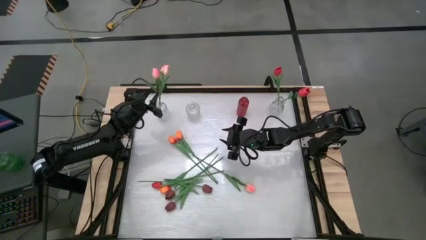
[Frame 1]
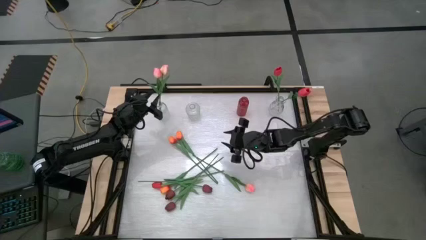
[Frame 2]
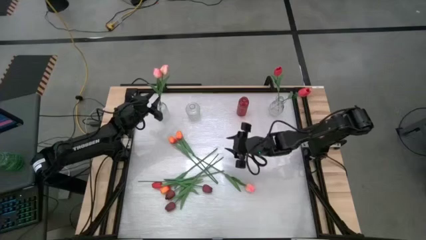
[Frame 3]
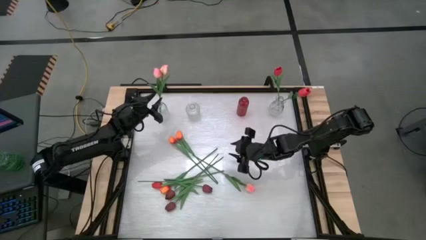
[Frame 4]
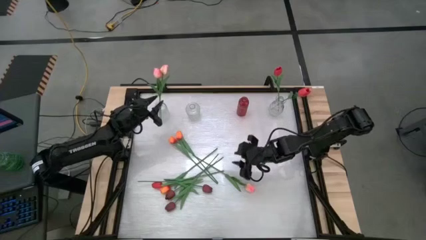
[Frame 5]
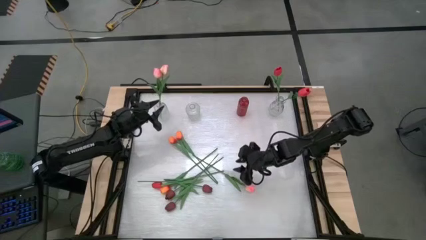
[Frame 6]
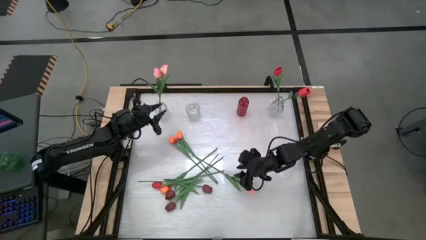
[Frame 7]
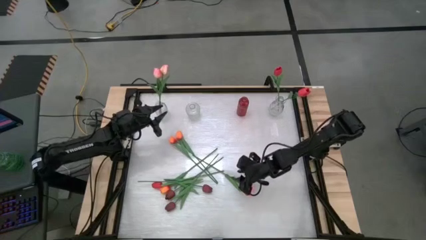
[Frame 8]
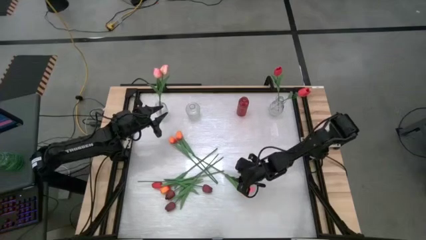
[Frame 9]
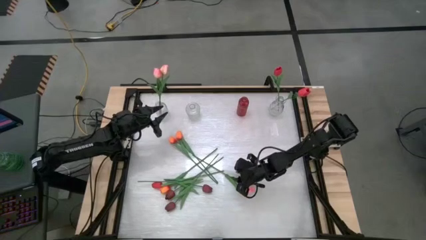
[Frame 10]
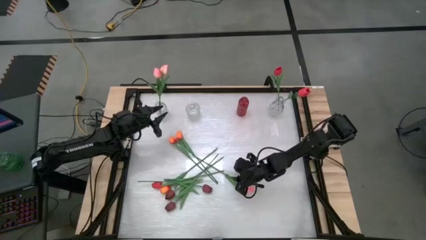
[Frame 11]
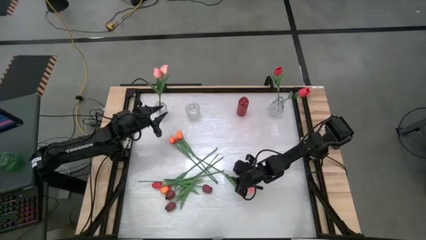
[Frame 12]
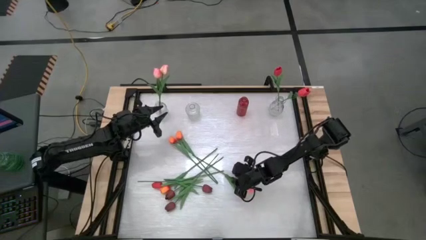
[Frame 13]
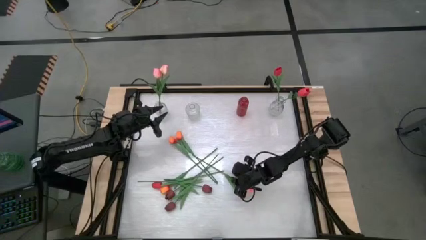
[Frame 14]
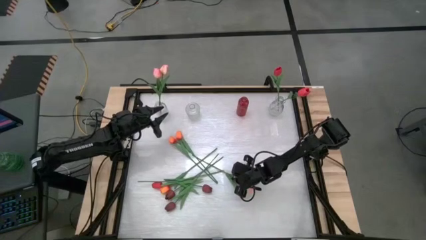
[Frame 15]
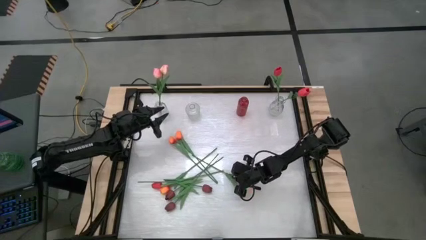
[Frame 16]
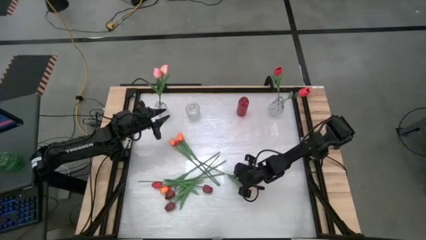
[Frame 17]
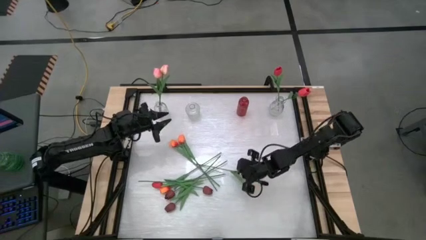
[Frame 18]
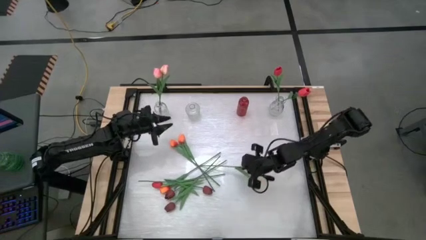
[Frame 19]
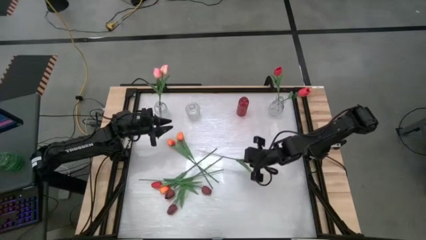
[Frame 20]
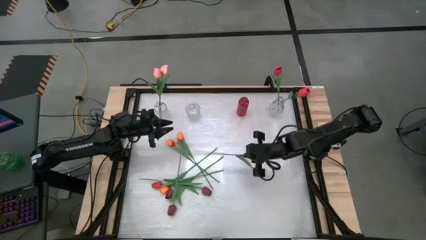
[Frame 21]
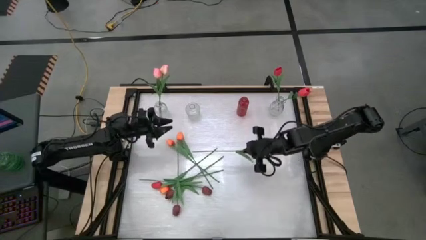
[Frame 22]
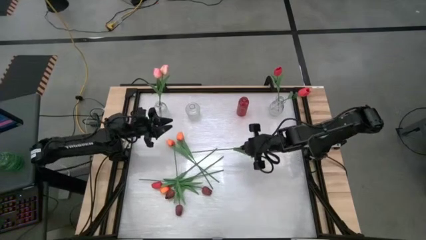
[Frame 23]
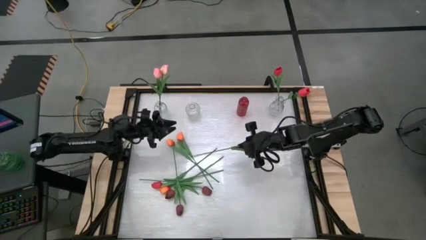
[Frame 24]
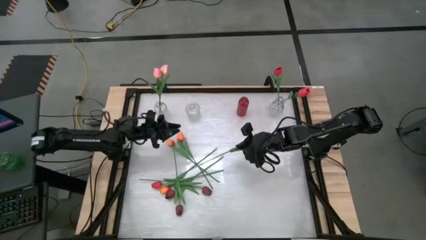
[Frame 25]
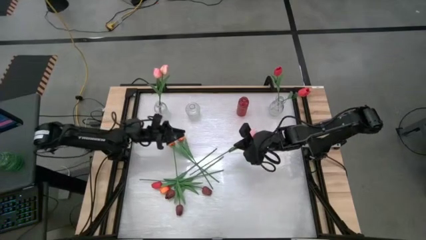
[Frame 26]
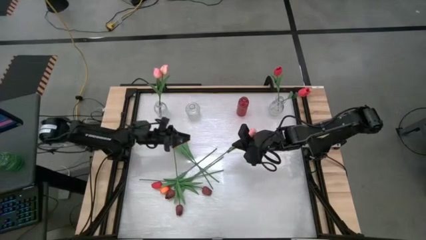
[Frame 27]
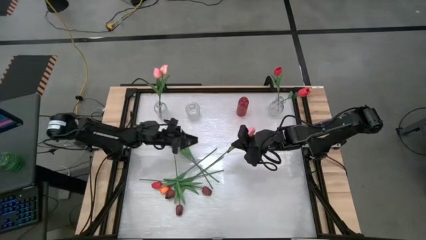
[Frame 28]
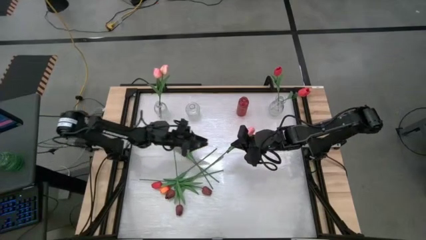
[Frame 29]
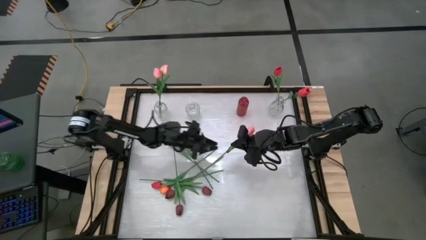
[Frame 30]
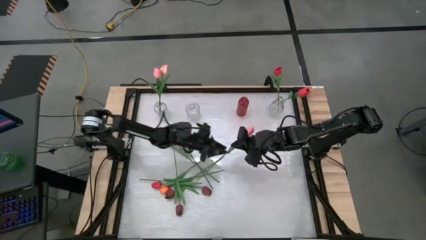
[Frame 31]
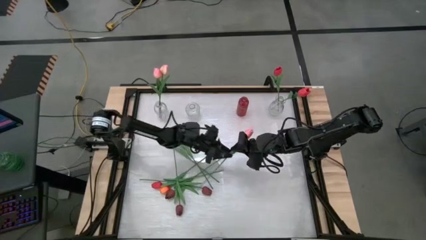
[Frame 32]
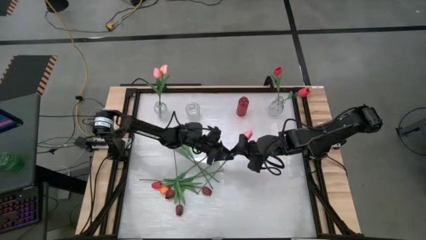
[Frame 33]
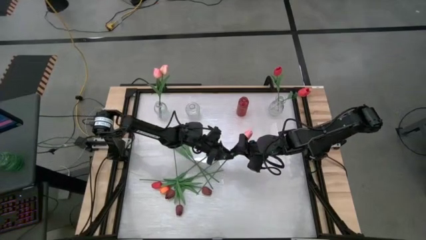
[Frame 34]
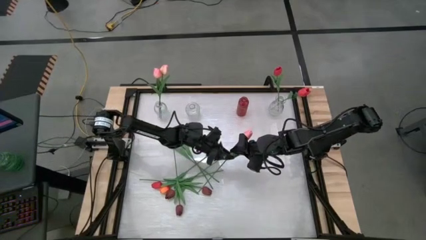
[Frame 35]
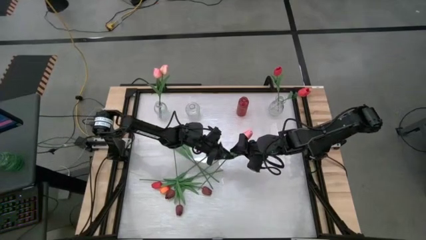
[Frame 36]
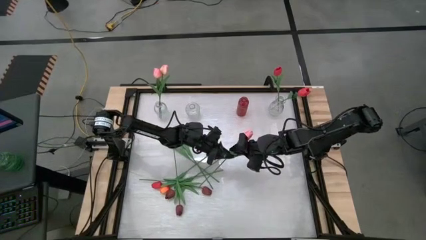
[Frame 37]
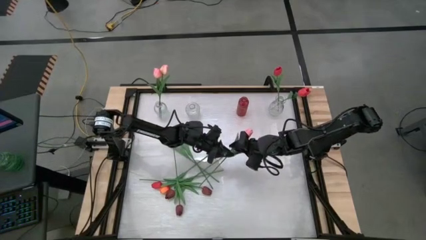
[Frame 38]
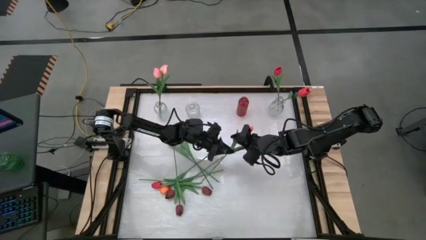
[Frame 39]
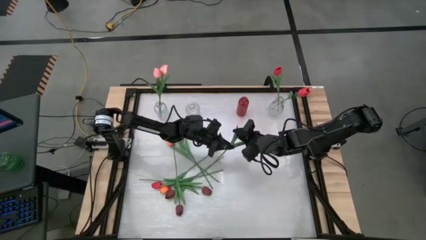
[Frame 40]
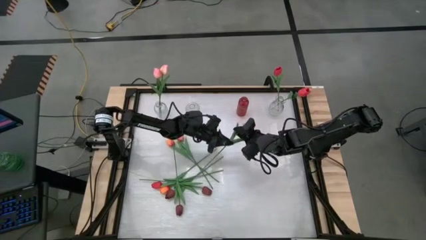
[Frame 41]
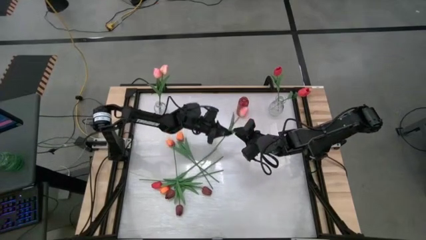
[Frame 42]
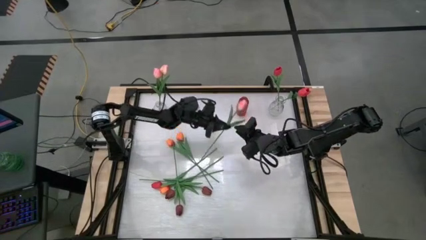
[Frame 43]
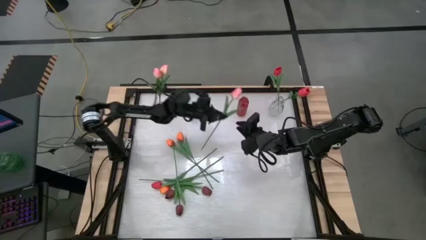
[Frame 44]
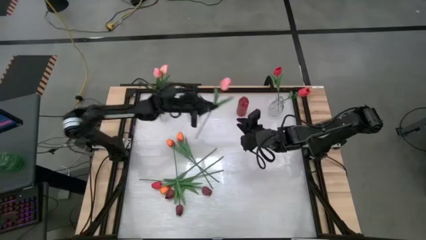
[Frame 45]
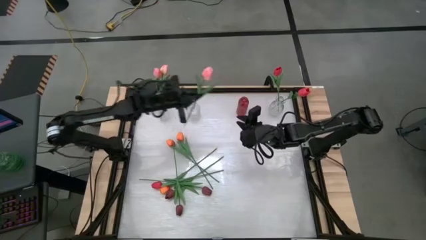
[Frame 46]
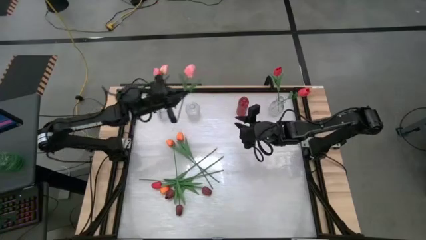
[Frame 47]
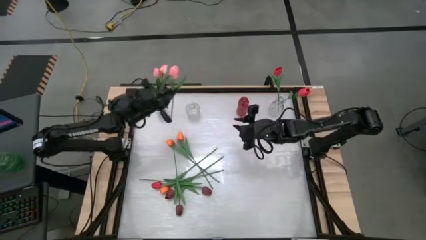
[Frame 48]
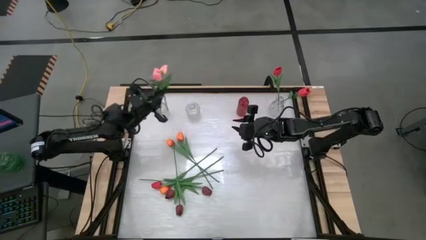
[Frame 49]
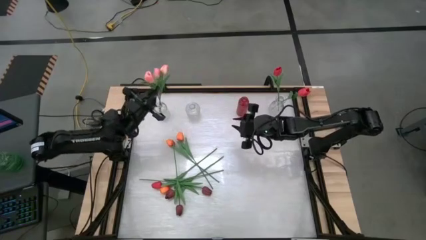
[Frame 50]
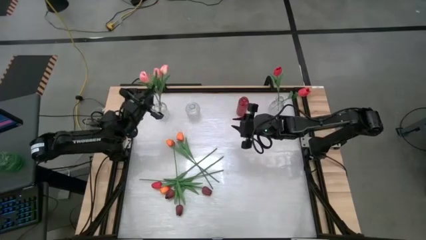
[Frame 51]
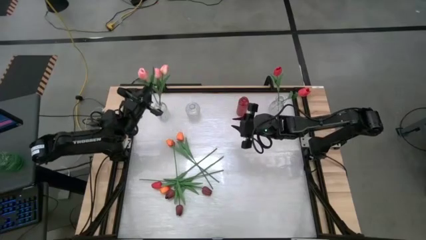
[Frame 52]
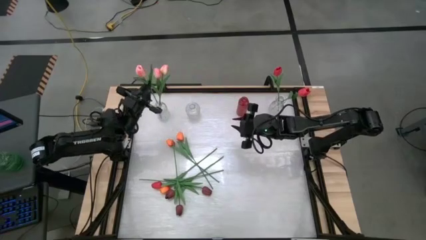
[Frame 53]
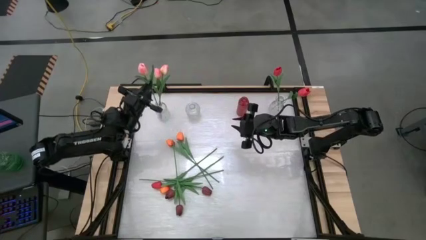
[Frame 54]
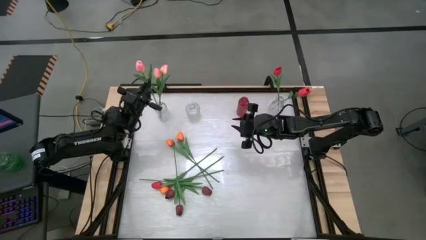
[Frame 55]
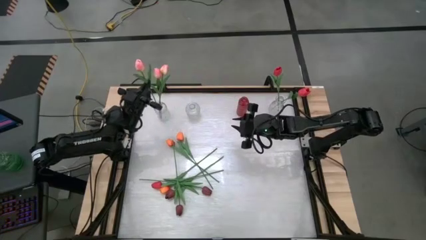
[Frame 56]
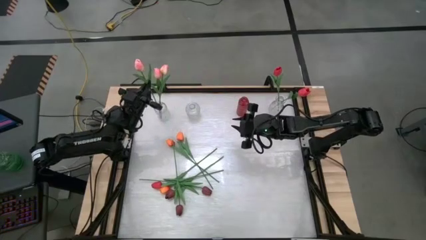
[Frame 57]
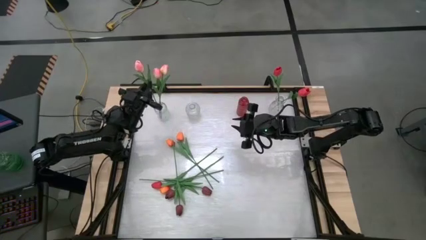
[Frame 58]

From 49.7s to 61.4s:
Task: Sort flowers into vase by color
Put the white-pink flower into the left transparent vase

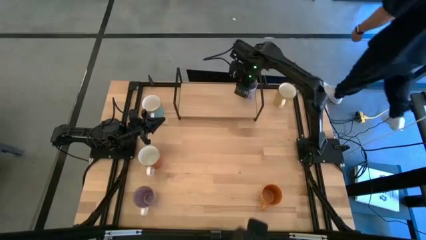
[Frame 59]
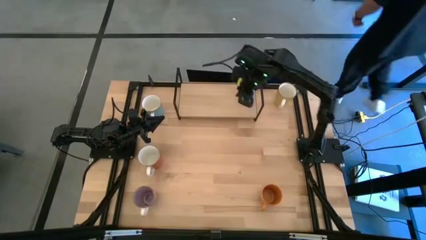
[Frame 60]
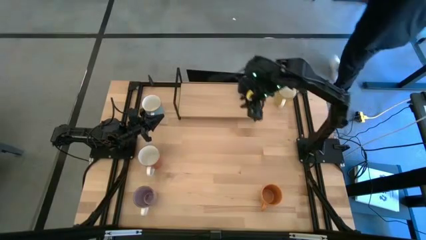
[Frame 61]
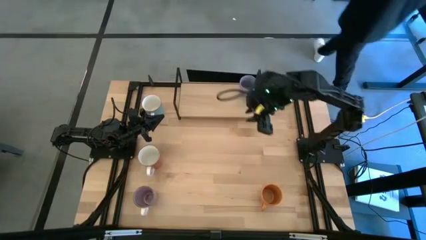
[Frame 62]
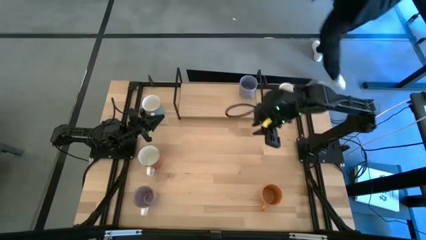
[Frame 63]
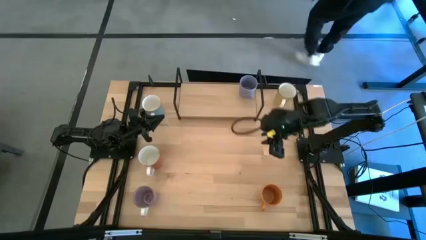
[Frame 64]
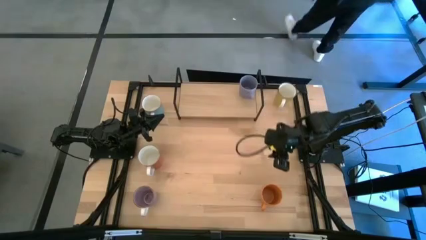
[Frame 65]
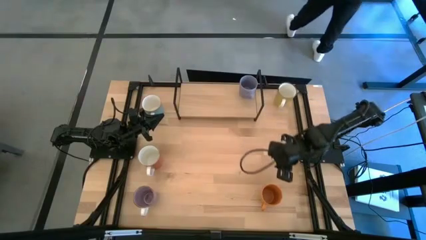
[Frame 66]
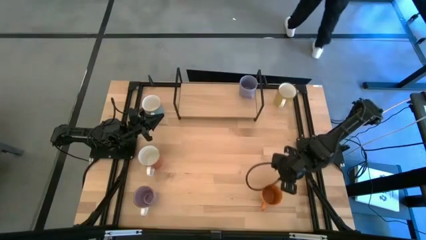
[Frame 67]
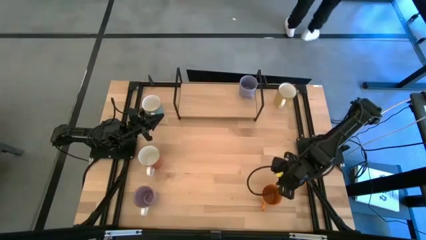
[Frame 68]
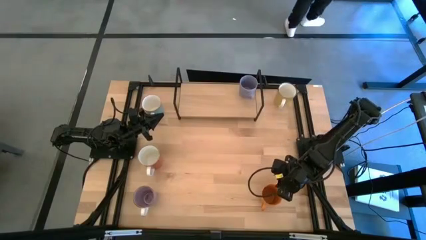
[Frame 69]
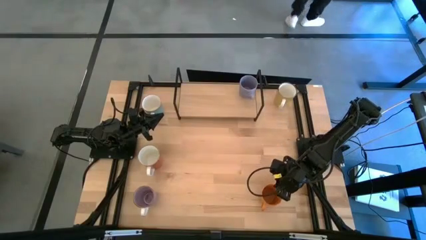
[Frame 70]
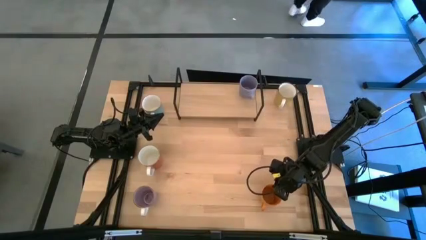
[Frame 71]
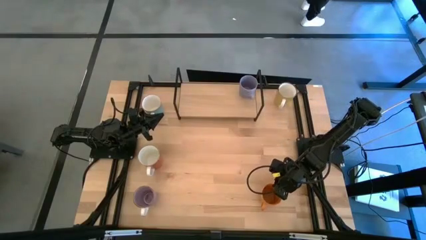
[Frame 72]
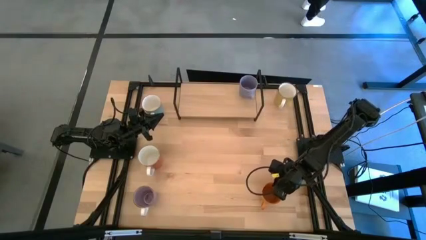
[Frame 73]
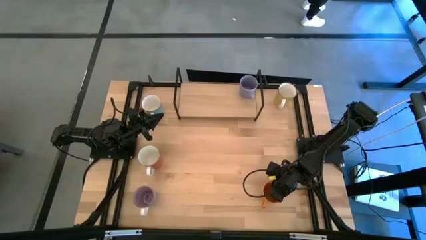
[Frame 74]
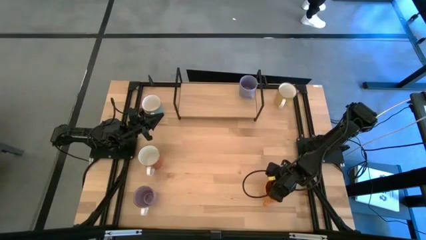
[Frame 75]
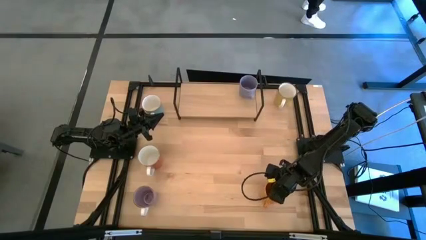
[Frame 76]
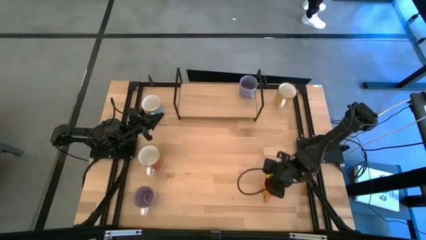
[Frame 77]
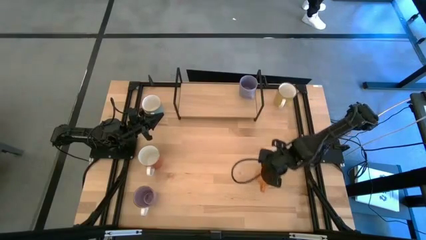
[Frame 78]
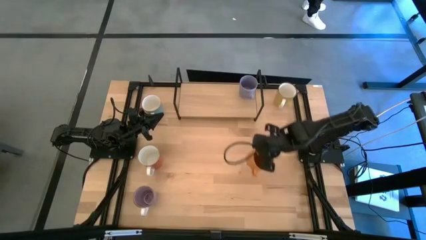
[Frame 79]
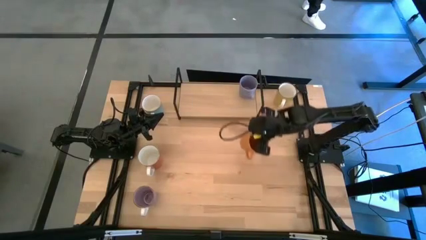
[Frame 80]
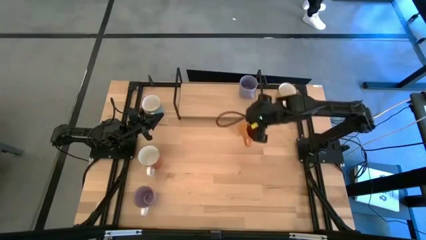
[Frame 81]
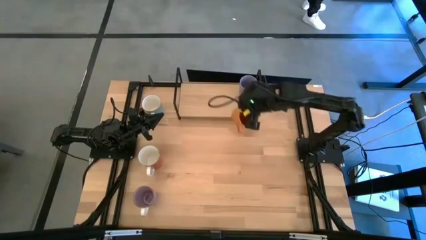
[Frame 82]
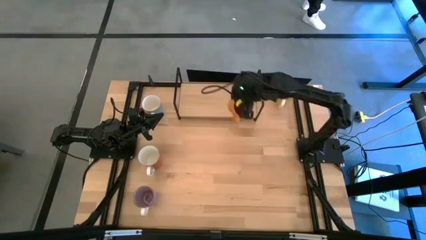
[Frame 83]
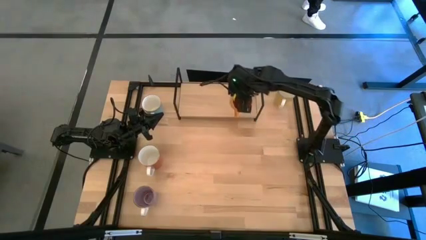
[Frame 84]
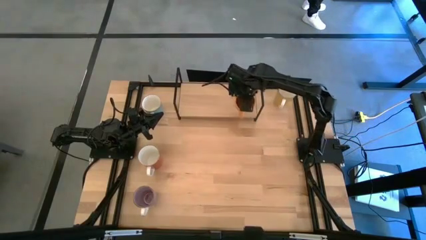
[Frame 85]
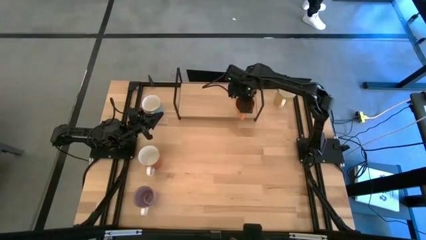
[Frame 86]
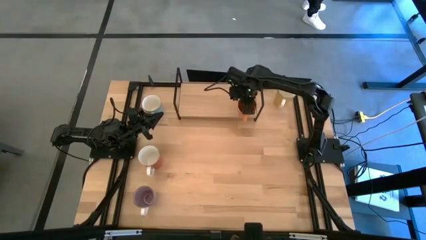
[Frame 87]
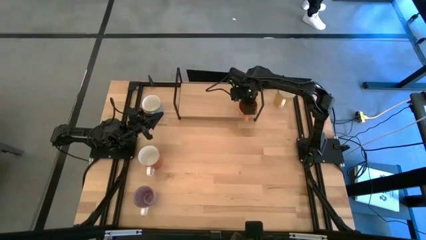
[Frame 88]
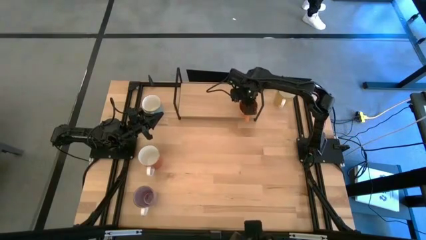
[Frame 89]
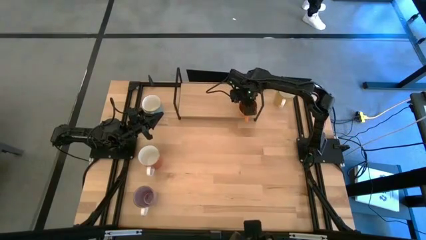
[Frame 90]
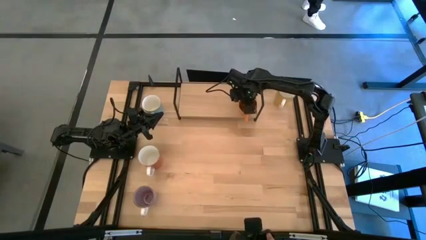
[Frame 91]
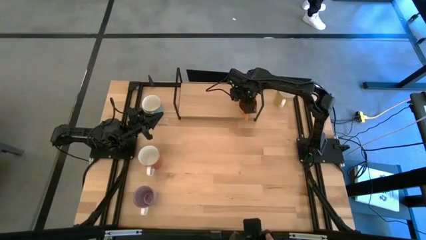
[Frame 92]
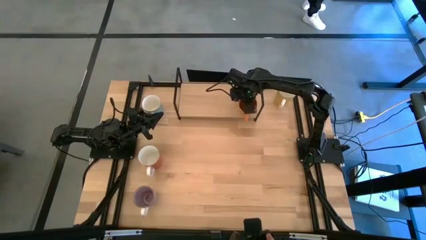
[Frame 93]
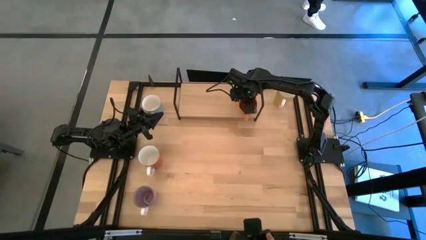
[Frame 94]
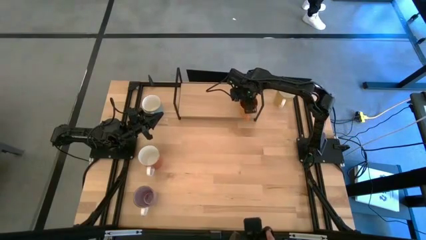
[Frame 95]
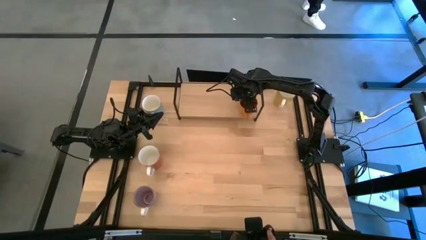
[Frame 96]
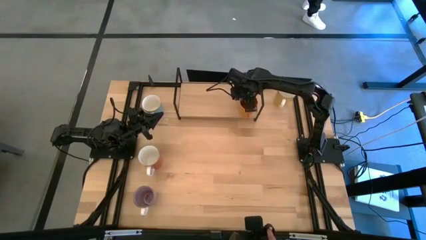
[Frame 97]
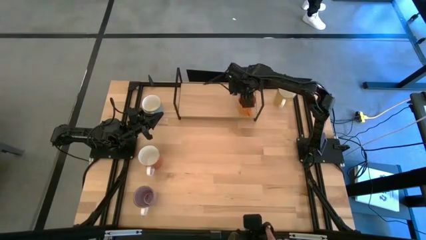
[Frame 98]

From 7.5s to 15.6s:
Task: Place coffee mugs
Put the light orange mug on the shelf aligned with the blue mug
